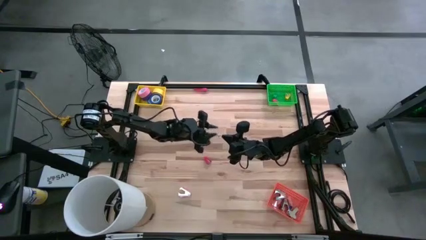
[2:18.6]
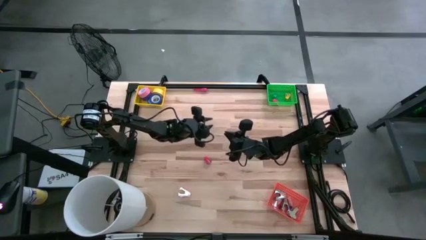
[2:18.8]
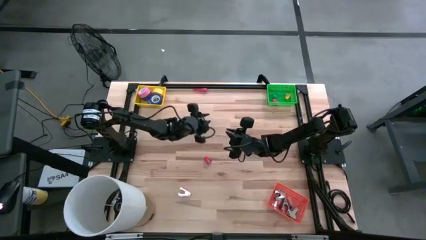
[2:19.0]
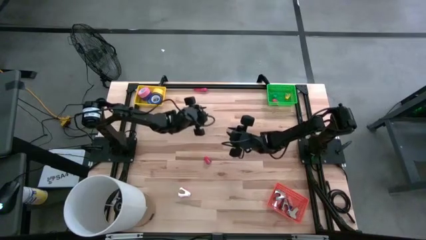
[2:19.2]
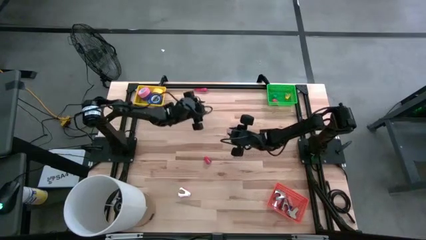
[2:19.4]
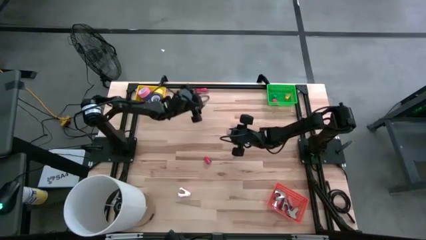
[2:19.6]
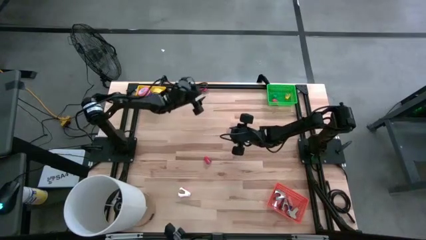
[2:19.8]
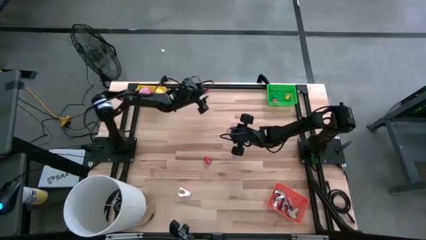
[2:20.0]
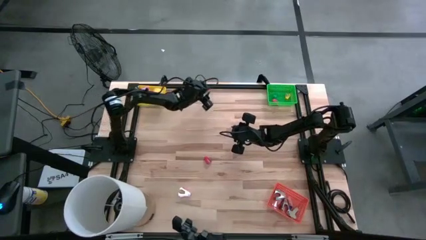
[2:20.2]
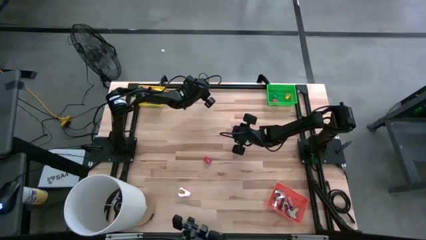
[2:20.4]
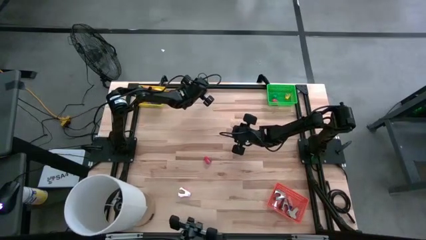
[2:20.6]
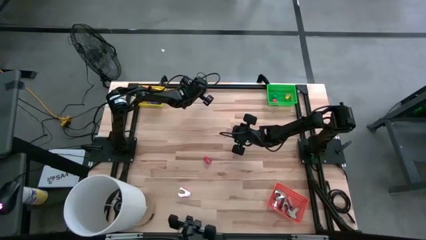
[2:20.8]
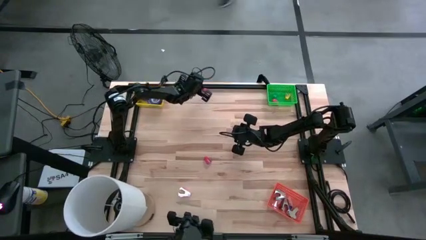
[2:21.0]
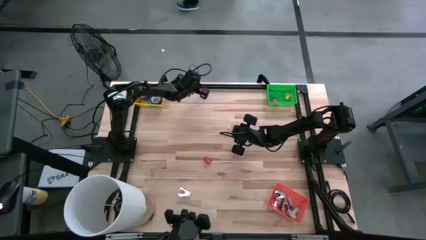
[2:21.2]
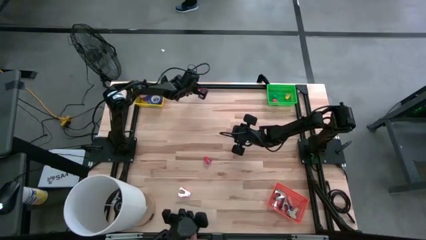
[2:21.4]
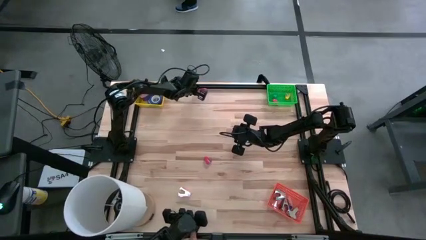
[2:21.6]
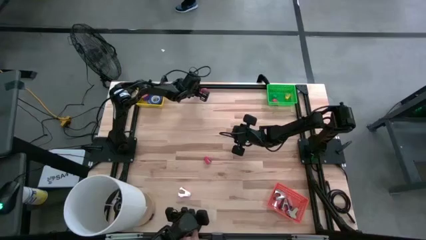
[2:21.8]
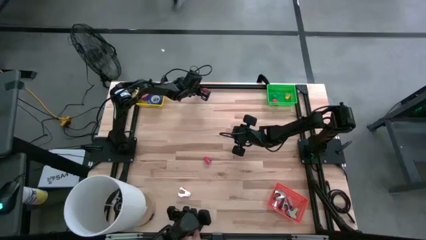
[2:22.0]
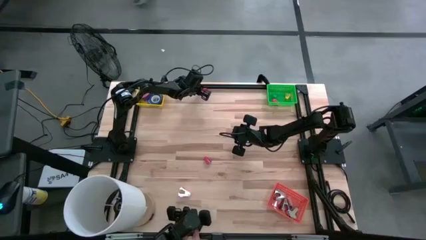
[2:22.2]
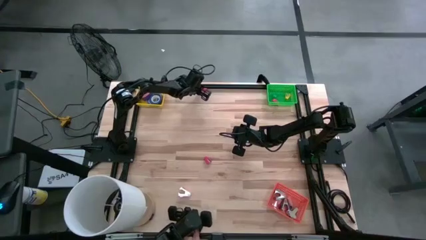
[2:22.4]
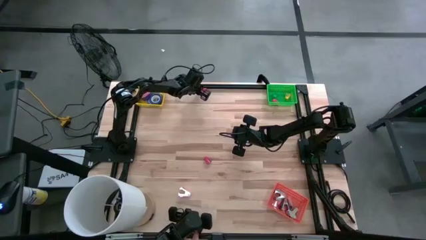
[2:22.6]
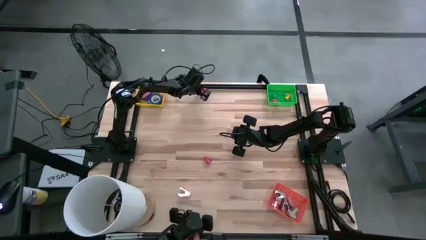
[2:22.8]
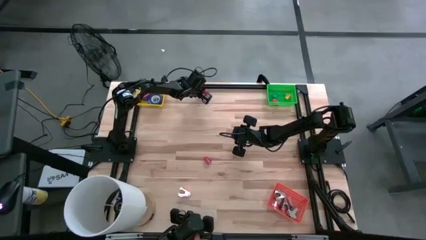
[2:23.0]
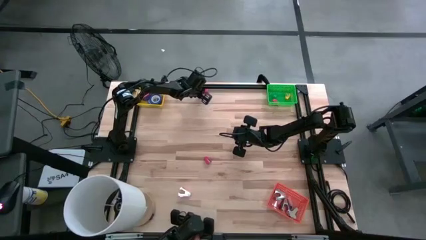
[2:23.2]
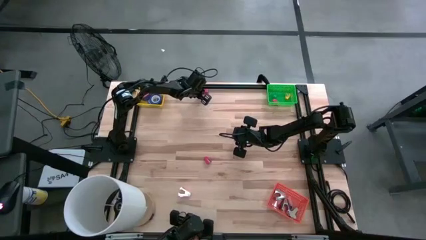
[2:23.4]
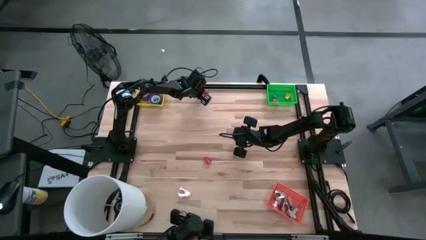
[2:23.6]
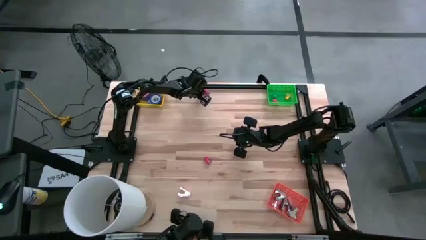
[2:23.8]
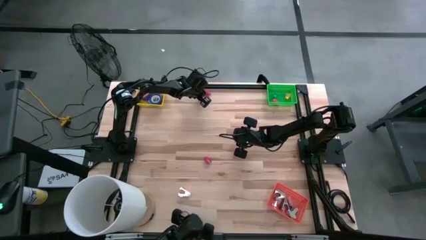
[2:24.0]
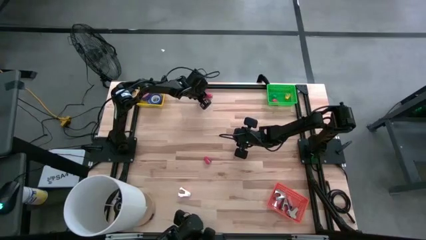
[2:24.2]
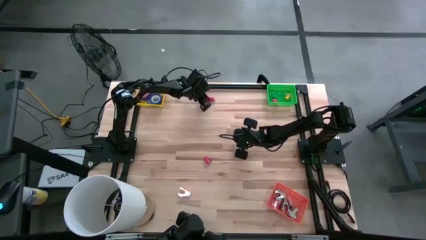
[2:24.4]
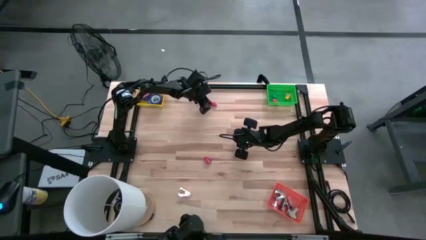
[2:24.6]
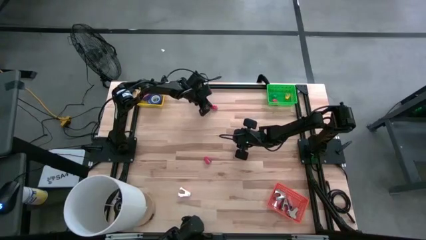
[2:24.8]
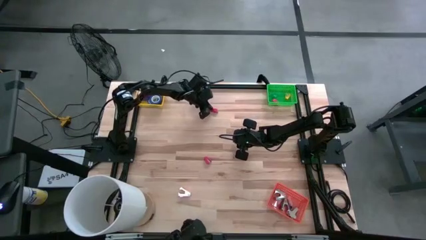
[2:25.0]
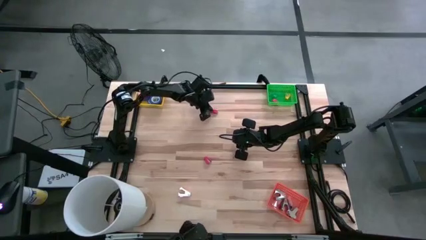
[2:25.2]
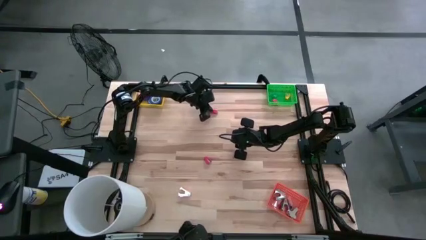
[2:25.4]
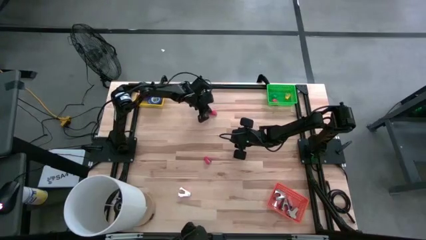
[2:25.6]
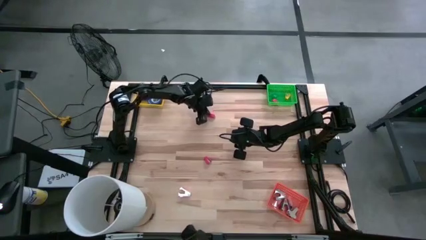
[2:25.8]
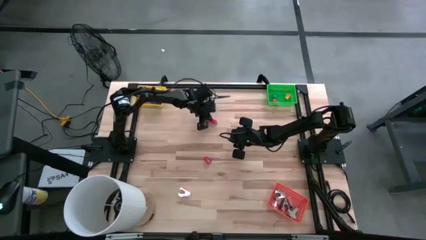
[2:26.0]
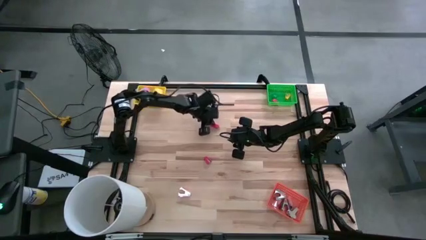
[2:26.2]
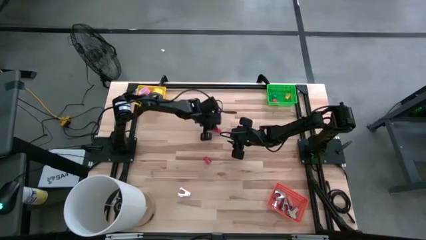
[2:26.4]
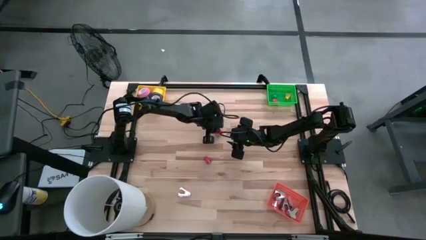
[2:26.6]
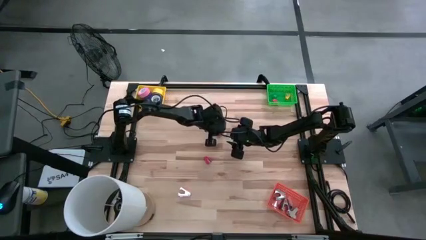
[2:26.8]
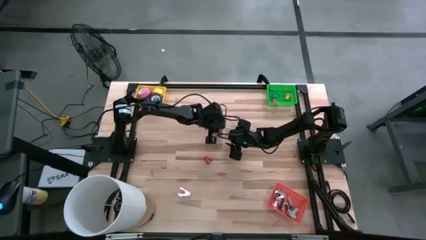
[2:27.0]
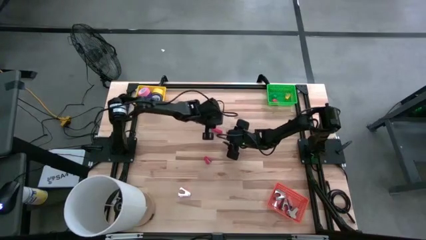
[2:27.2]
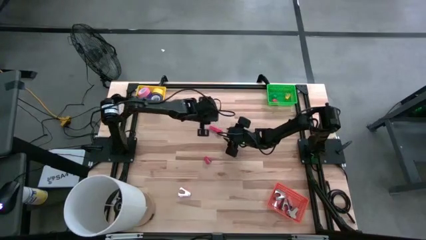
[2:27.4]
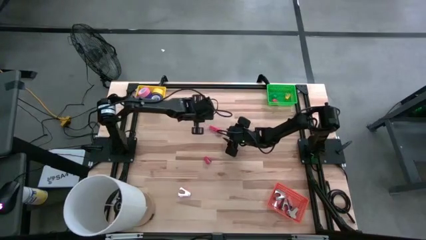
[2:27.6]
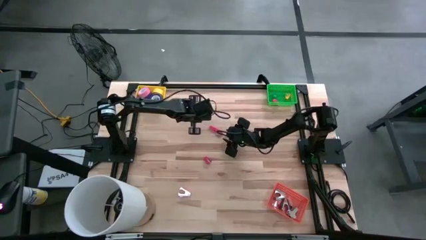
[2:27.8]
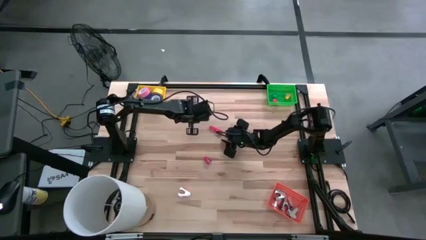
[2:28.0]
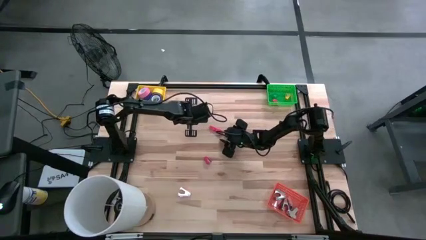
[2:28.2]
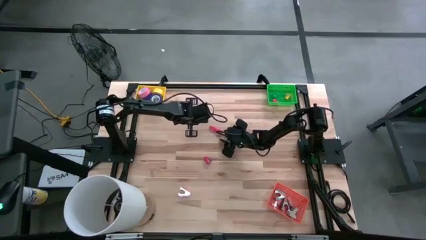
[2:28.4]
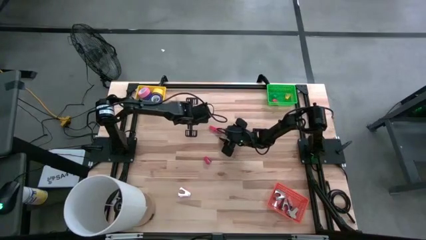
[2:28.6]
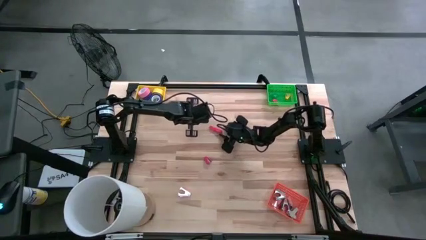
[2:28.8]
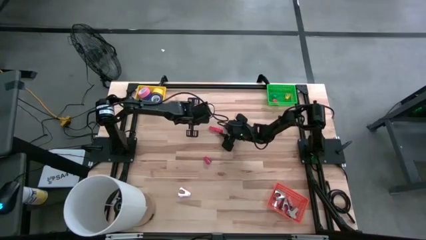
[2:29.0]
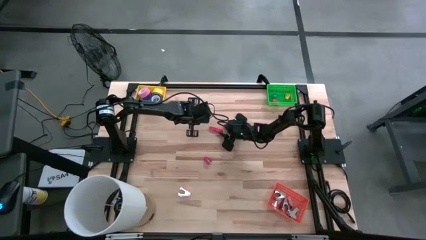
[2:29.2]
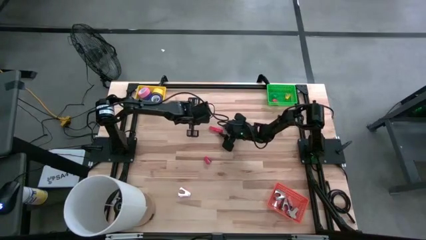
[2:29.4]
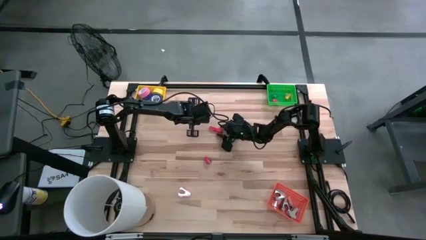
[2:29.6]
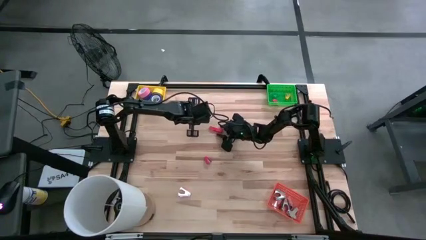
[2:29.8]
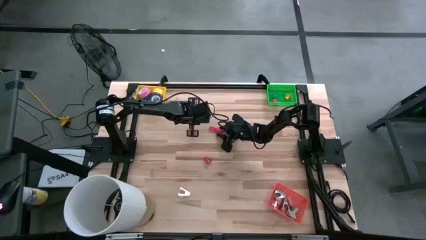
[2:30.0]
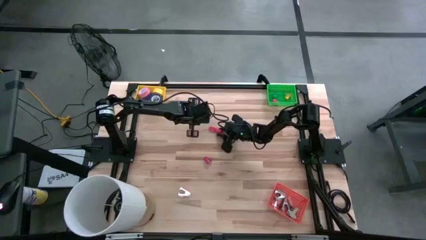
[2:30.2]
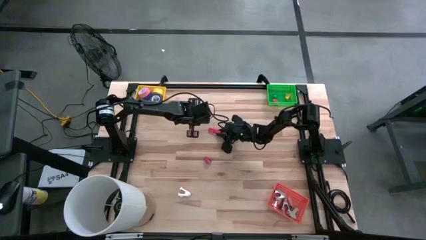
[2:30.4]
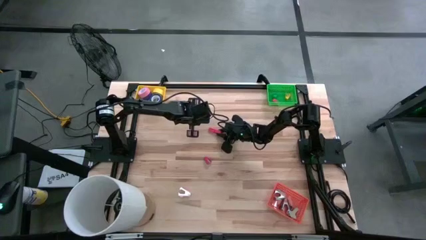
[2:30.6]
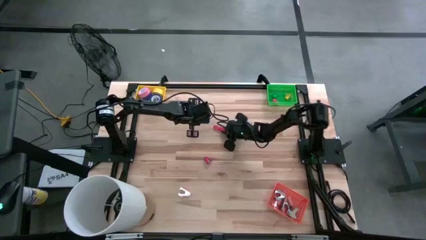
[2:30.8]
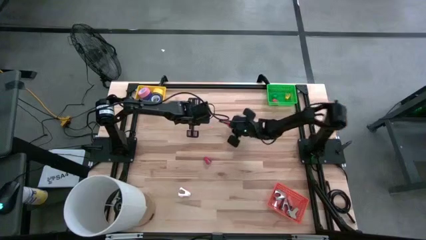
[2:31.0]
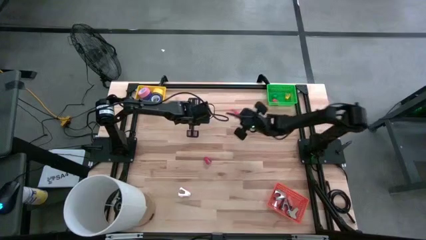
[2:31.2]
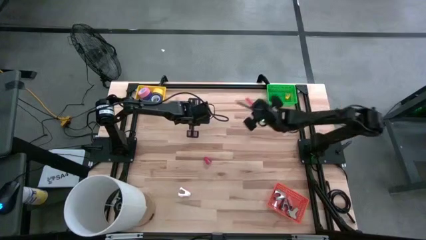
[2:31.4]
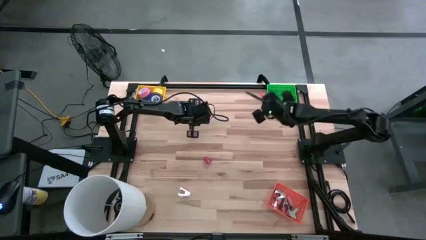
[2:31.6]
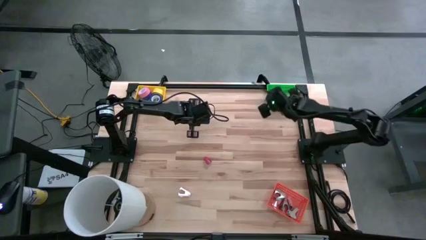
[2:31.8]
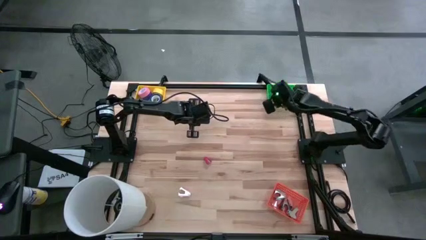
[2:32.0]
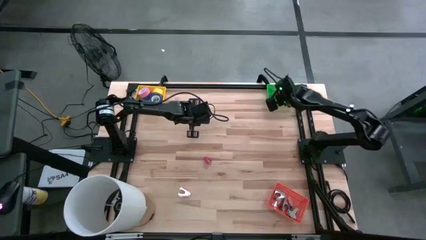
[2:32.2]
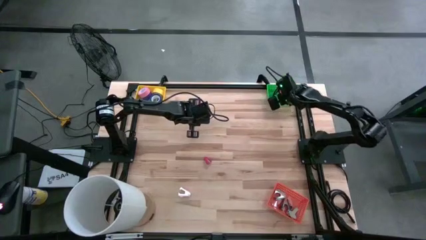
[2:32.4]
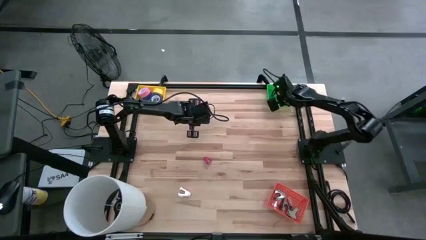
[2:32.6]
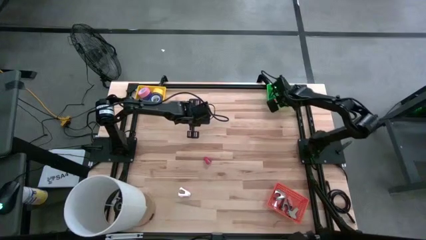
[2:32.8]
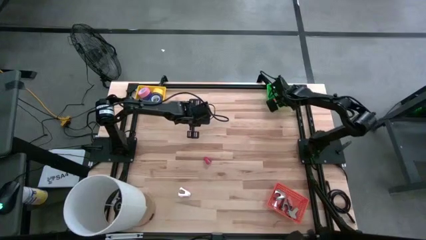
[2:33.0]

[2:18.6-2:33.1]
Task: Pick and place Stapler, Stapler remover, tape
Put the top red stapler into the green bin

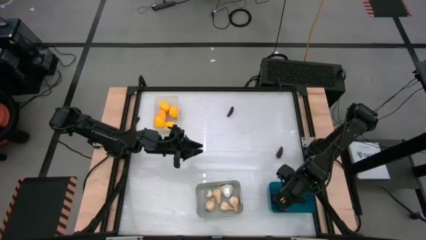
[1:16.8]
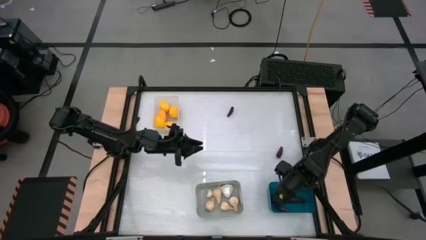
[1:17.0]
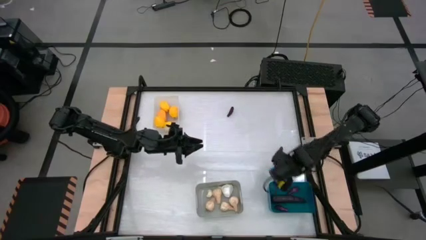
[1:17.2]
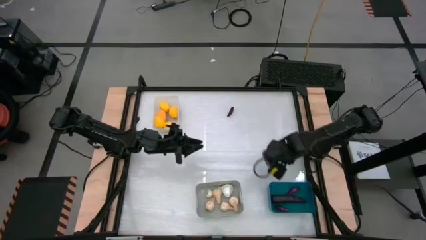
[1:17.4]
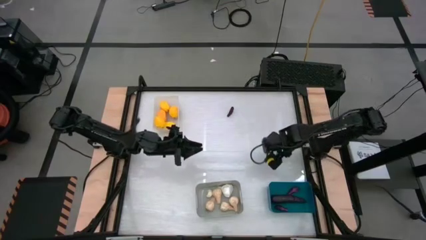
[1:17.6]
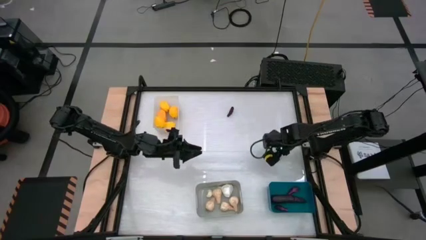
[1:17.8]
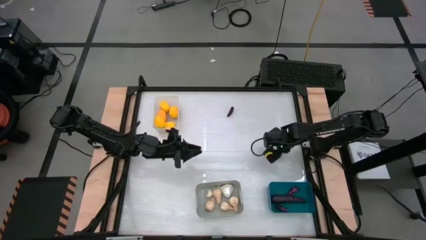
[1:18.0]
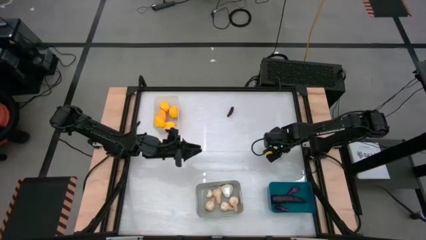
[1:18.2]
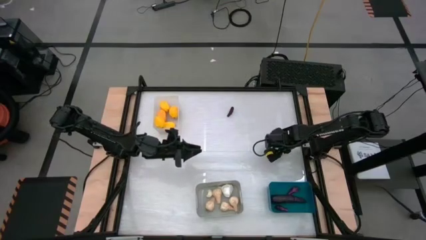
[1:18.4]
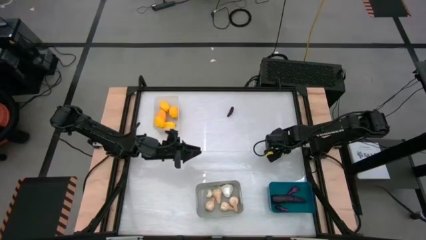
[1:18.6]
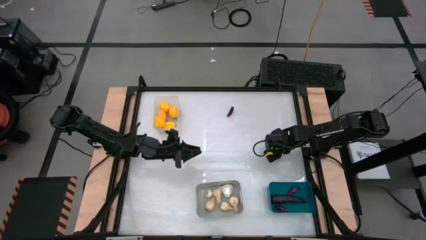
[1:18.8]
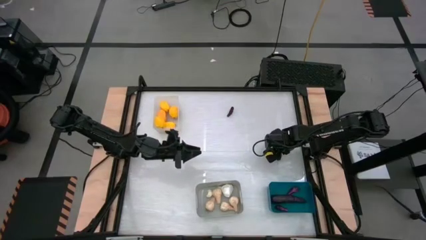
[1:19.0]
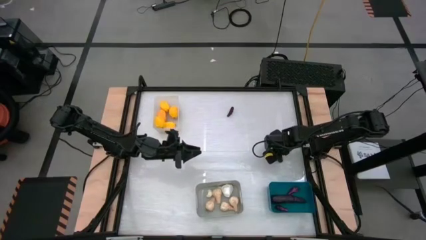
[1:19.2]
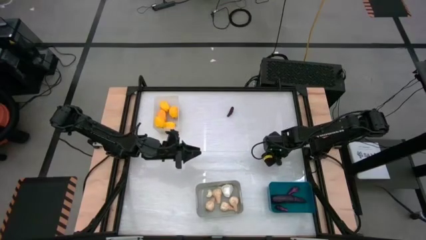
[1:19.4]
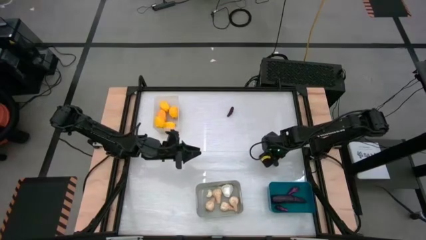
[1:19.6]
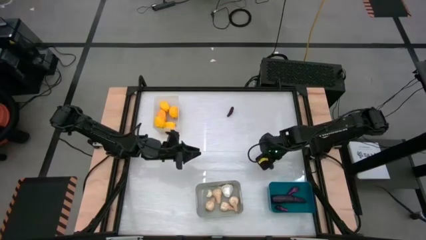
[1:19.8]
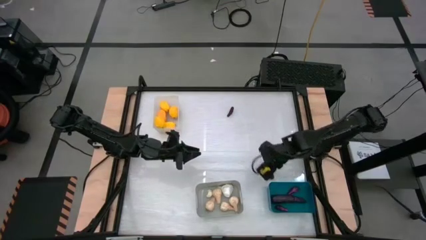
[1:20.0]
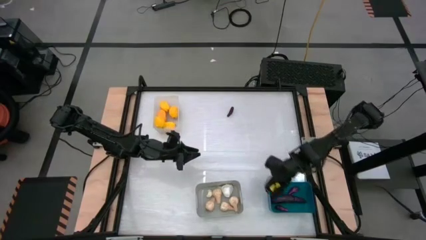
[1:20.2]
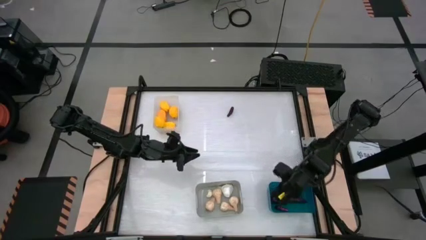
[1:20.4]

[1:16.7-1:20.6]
Task: Sort produce into baskets
Put the eggplant into the blue bin
